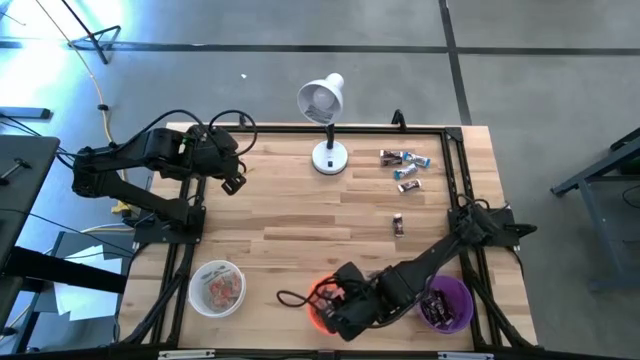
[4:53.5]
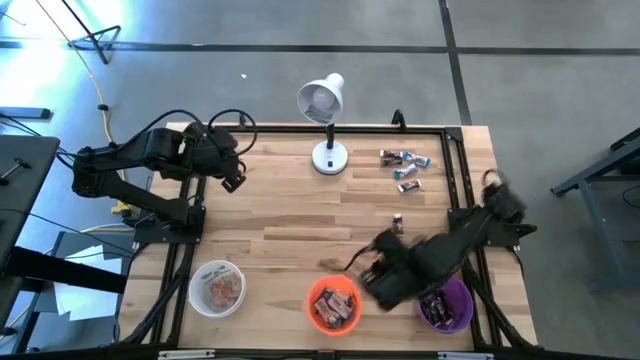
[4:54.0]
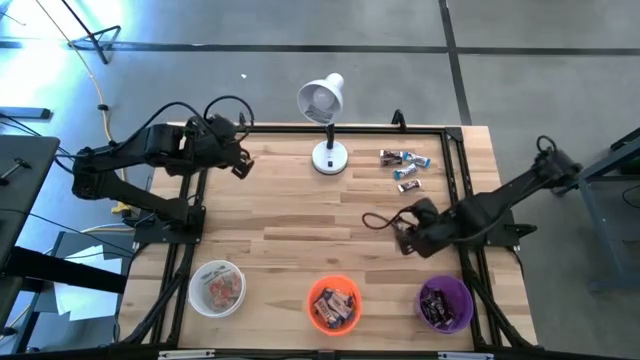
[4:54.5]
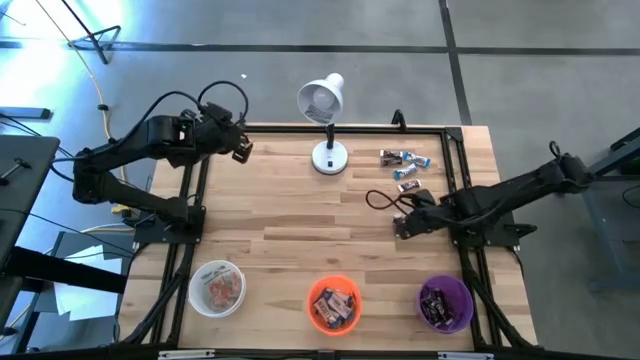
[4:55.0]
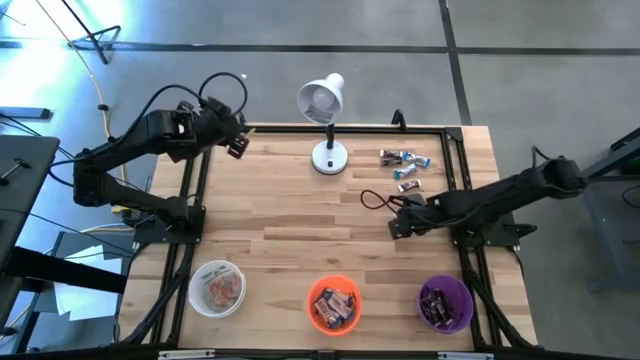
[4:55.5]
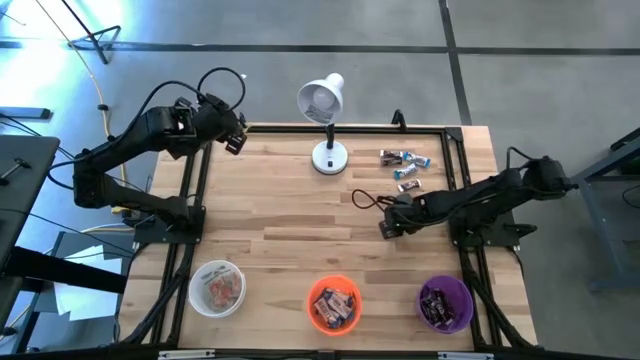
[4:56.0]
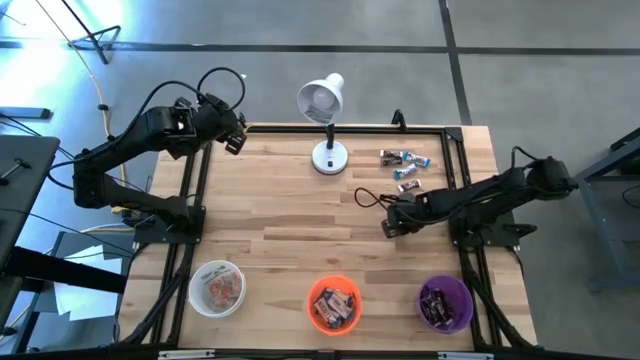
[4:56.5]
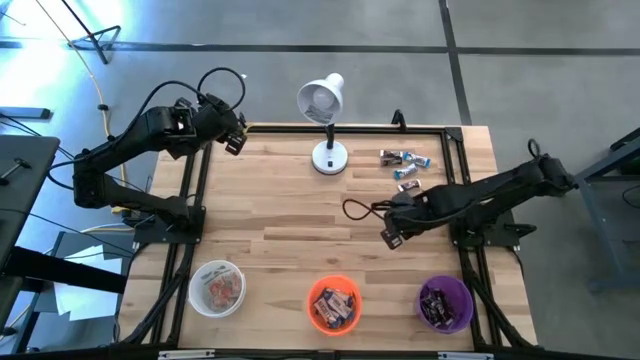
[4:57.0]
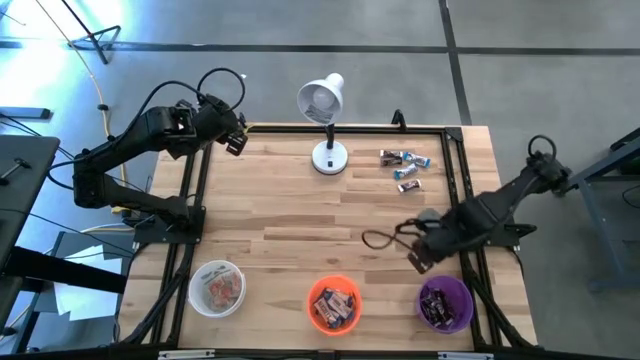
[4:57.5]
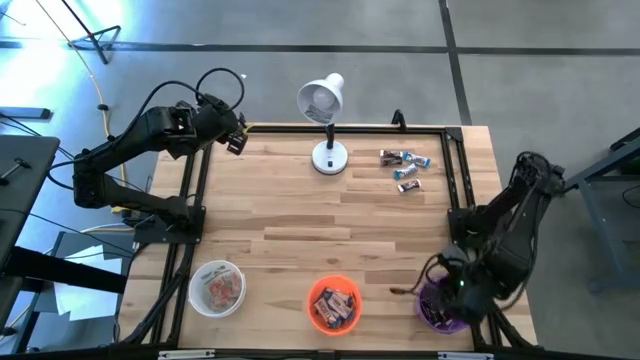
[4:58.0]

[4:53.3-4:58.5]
Task: Organize candy in baskets
Put the brown chocolate bar into the purple bucket

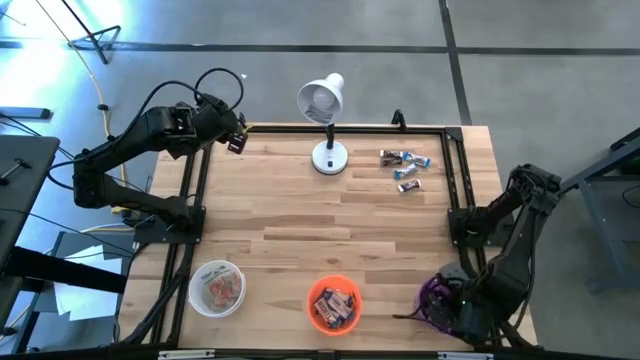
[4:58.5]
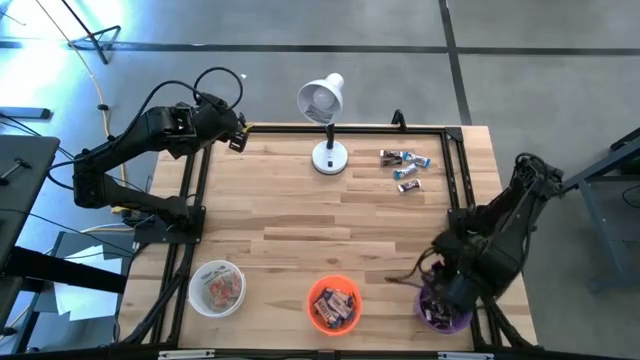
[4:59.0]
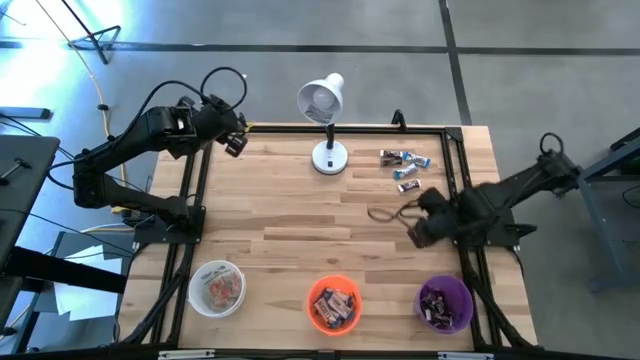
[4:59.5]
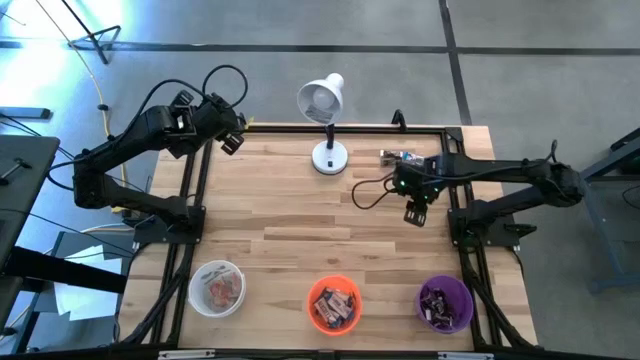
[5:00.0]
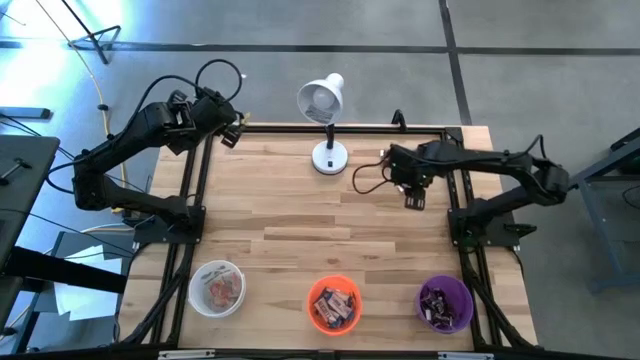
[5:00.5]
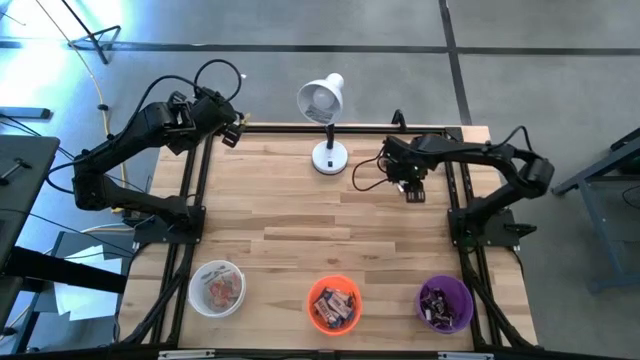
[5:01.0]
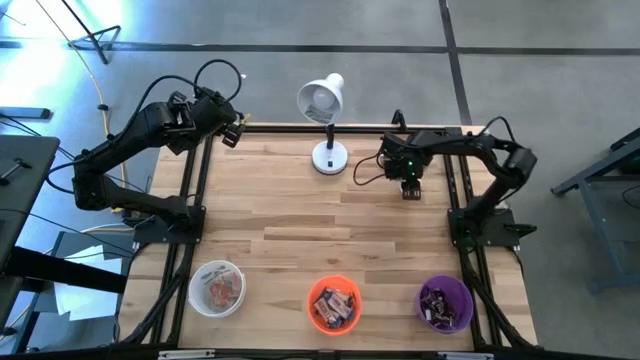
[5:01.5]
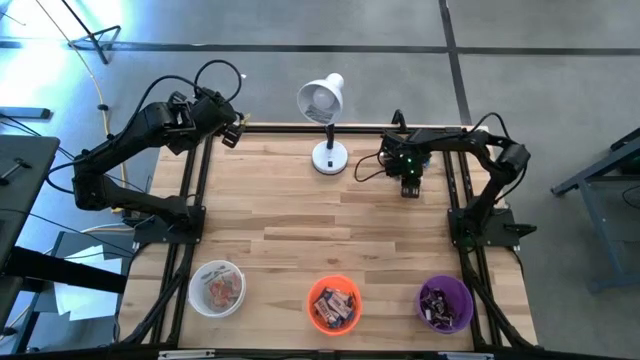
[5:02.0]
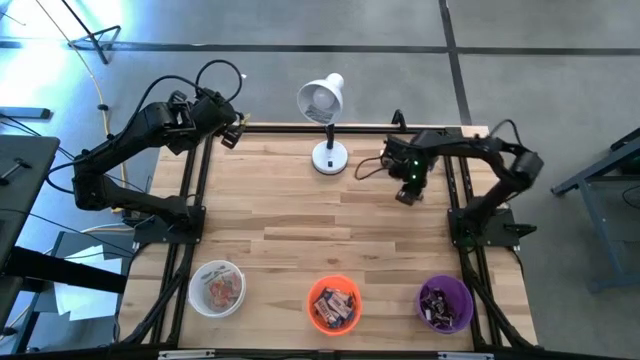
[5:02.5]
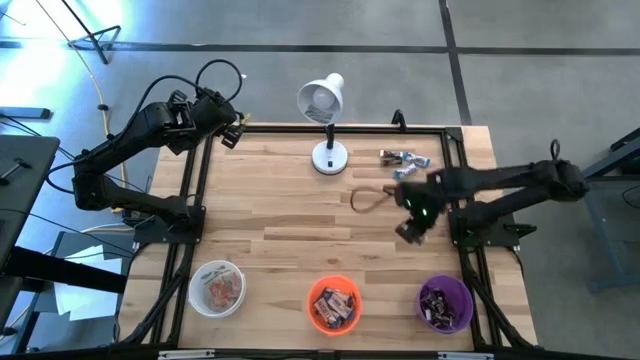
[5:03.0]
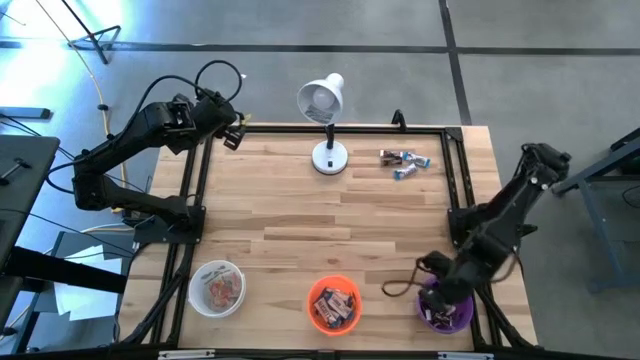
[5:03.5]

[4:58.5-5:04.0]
Put the brown chocolate bar into the purple bucket

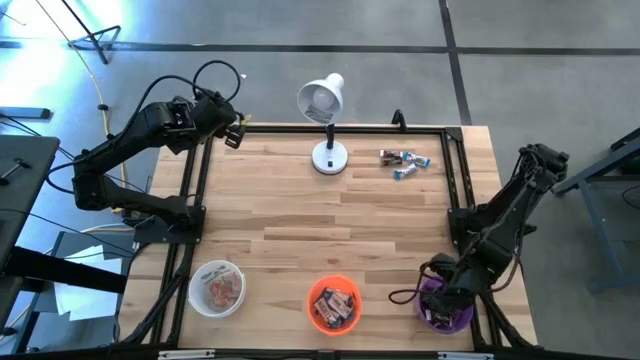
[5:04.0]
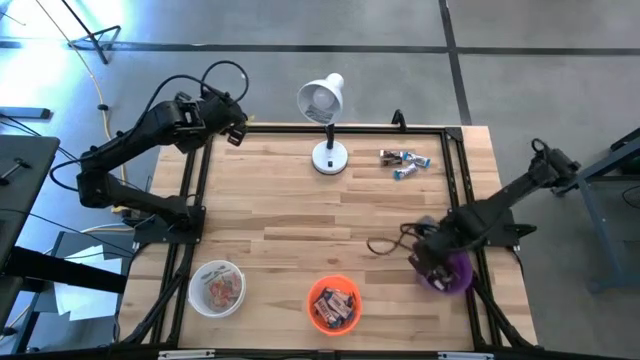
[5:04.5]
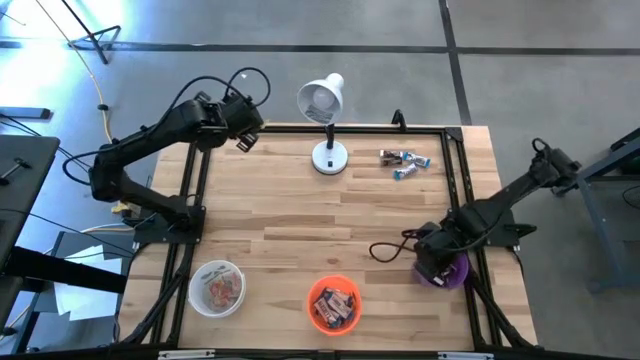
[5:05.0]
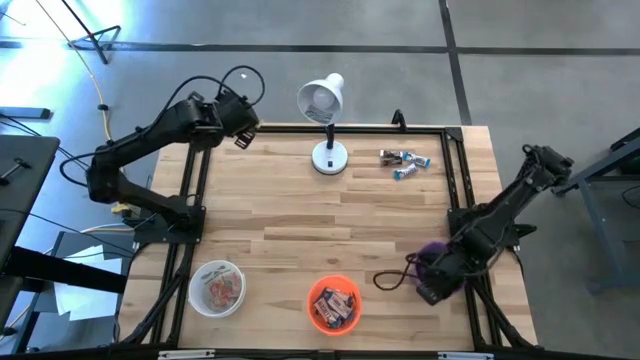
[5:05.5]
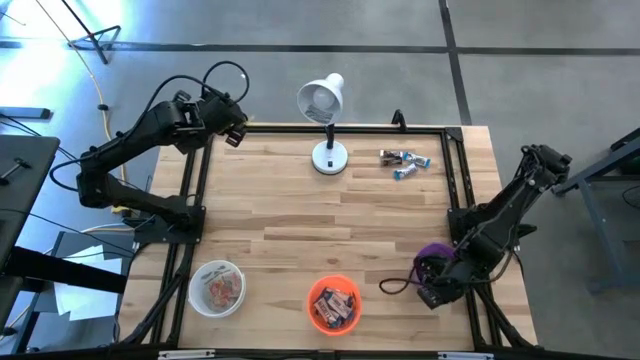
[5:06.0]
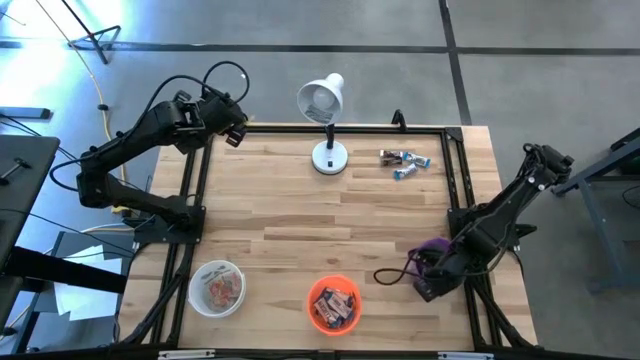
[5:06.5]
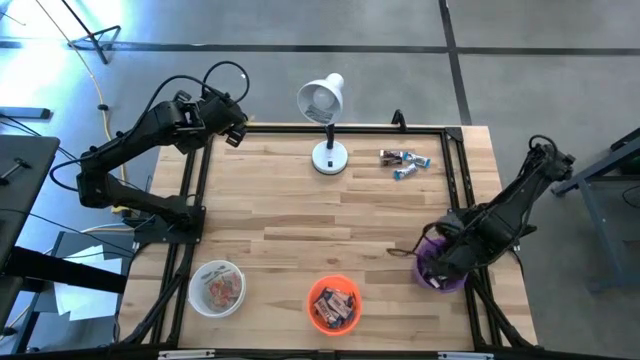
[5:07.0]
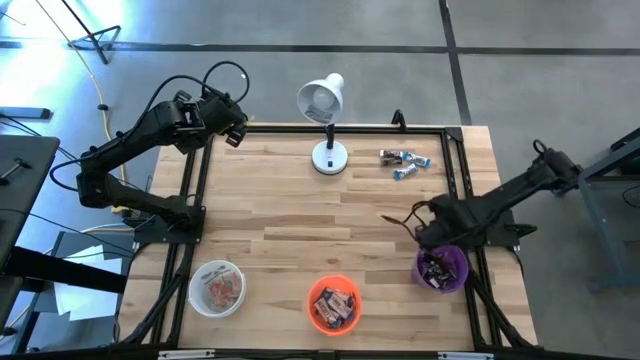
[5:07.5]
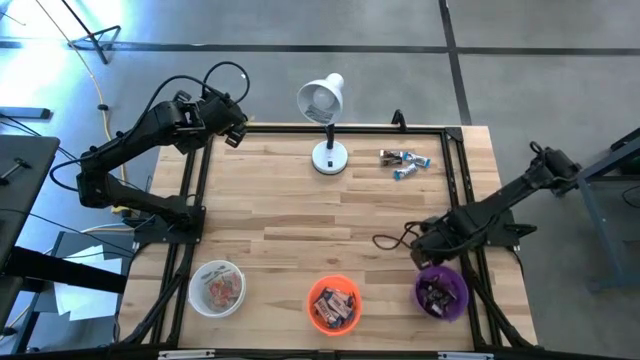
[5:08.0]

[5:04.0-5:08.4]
Adjust the purple bucket

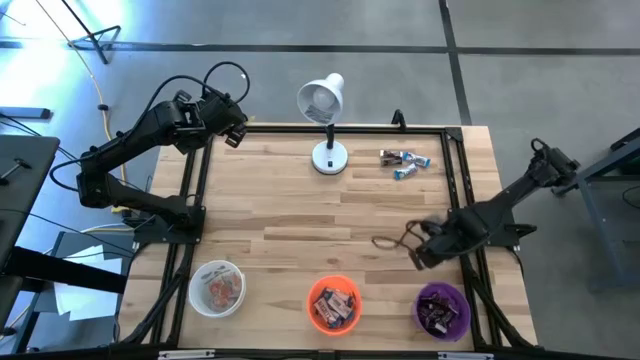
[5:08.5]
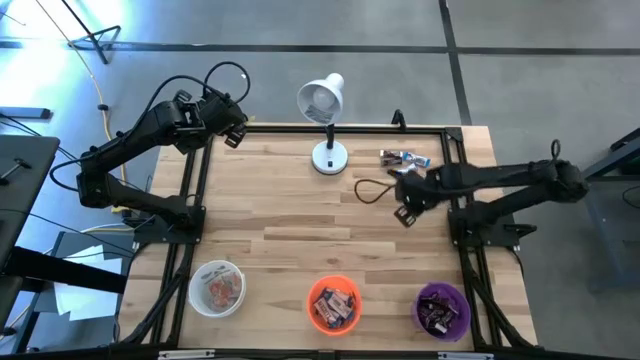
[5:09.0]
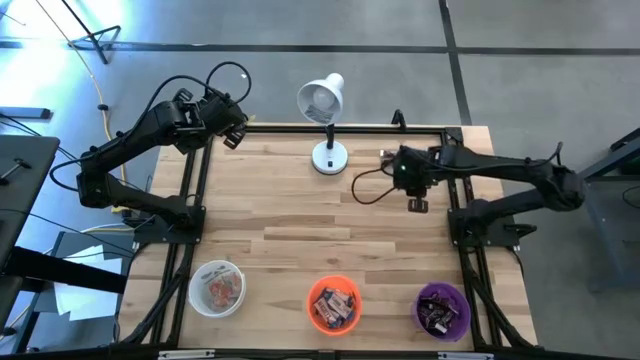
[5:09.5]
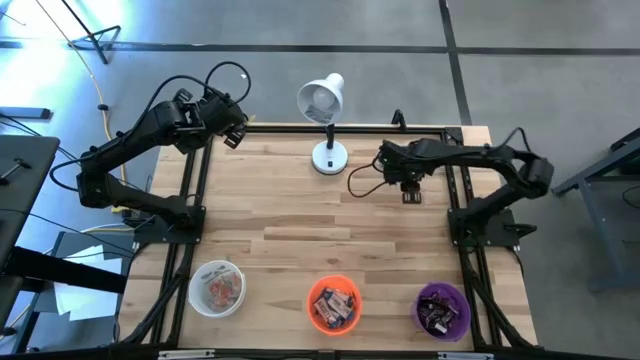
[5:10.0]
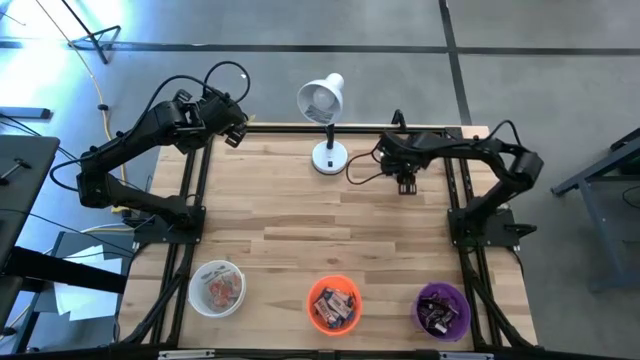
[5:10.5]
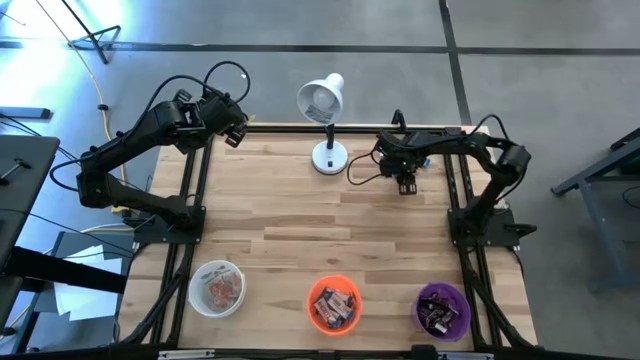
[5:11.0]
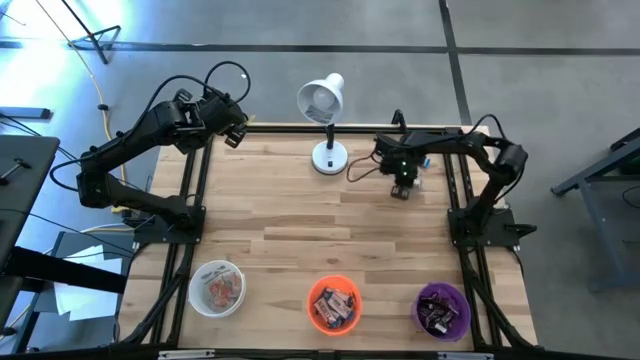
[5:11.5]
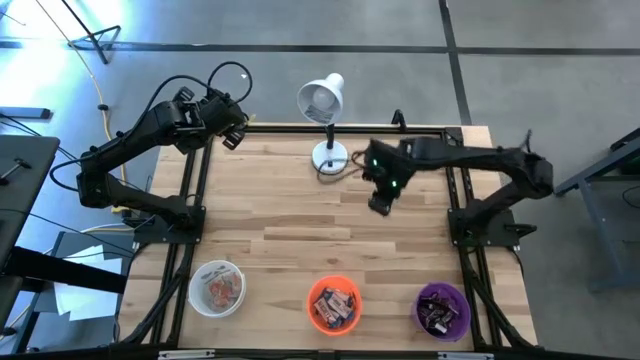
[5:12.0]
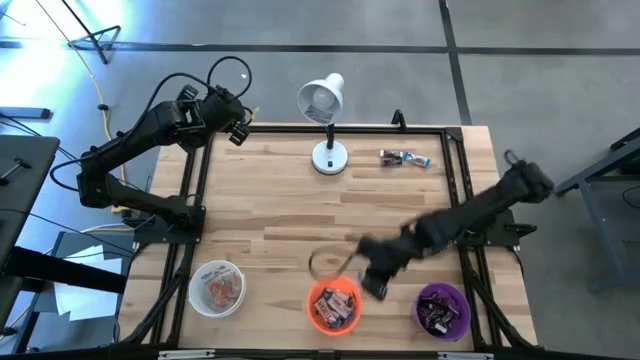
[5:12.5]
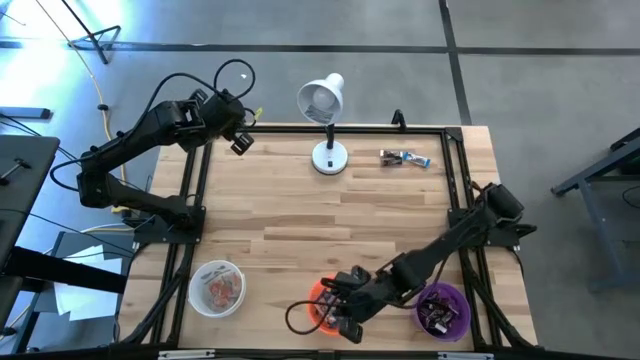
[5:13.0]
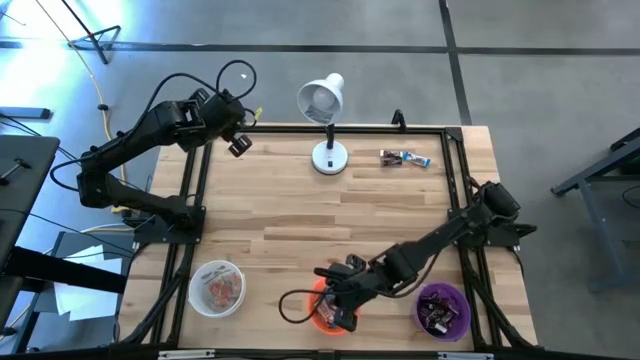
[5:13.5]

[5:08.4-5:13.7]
Put the white chocolate bar into the orange bucket
